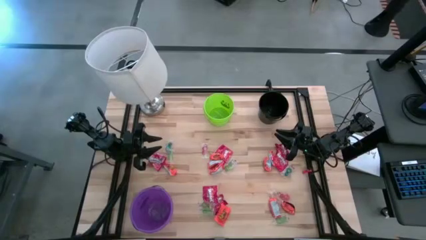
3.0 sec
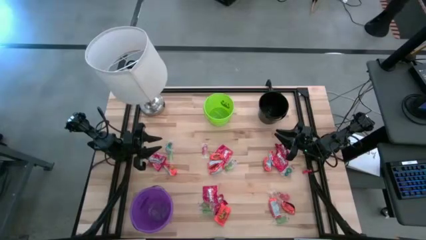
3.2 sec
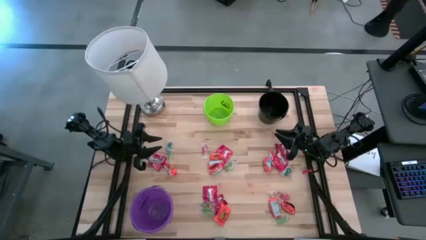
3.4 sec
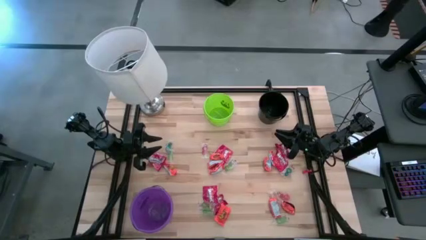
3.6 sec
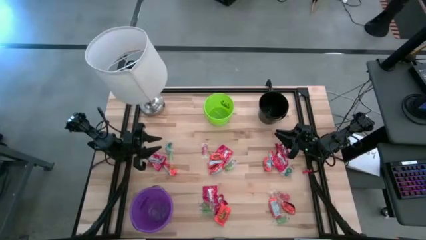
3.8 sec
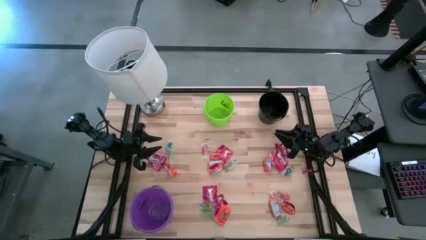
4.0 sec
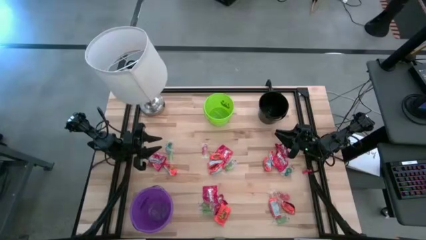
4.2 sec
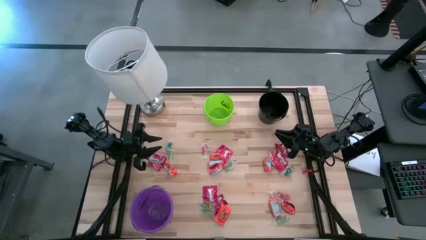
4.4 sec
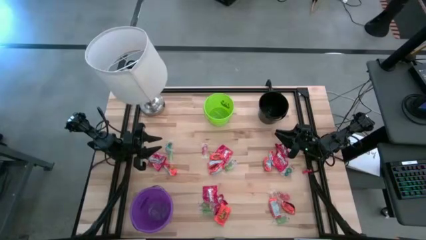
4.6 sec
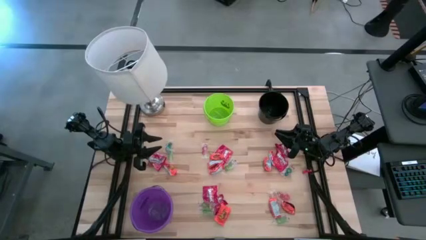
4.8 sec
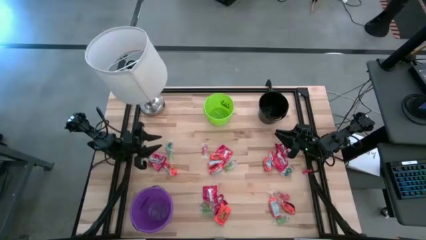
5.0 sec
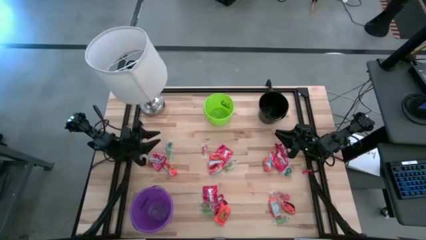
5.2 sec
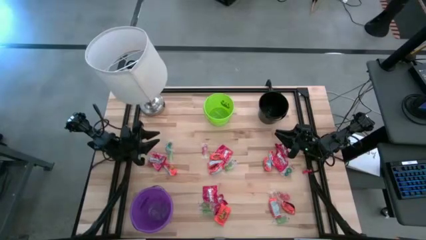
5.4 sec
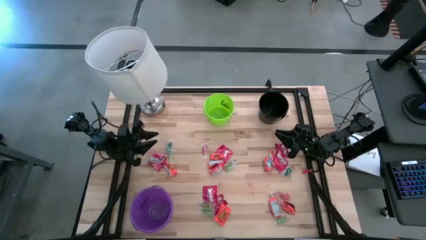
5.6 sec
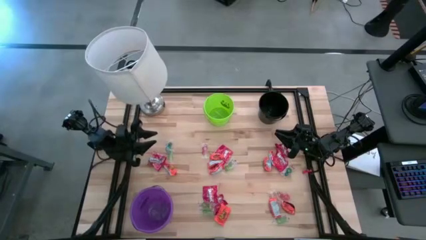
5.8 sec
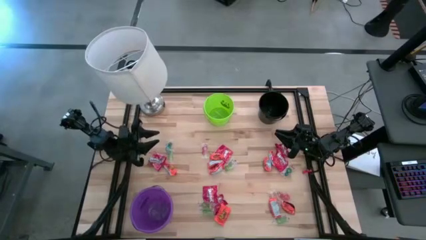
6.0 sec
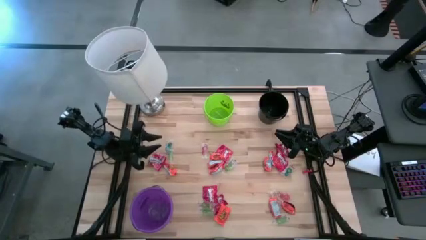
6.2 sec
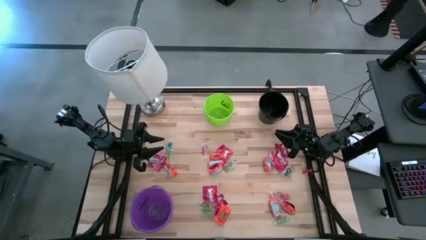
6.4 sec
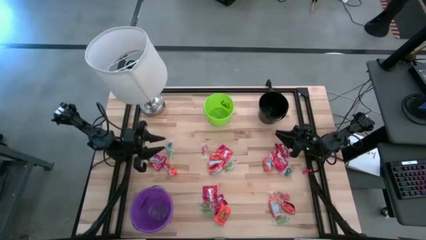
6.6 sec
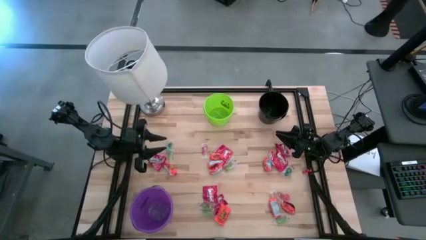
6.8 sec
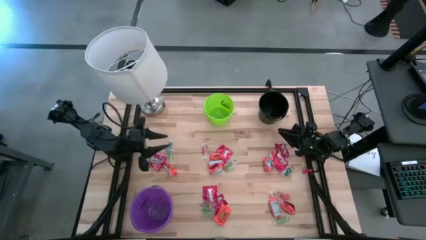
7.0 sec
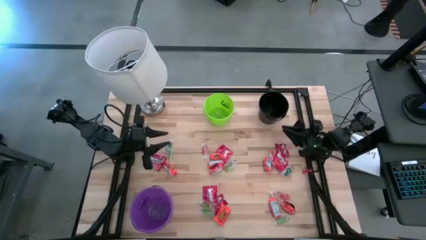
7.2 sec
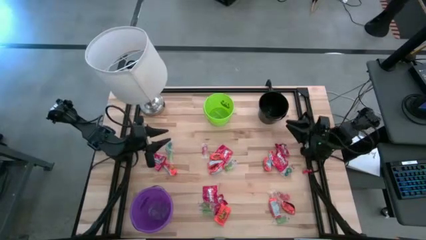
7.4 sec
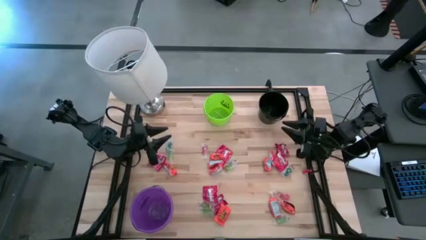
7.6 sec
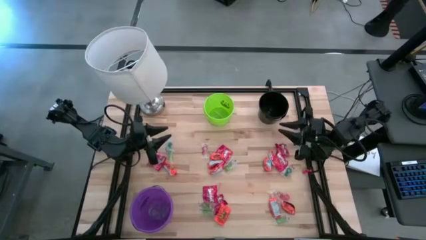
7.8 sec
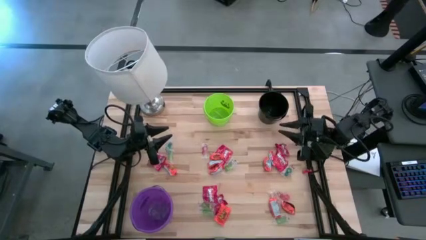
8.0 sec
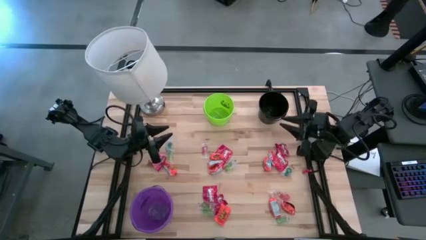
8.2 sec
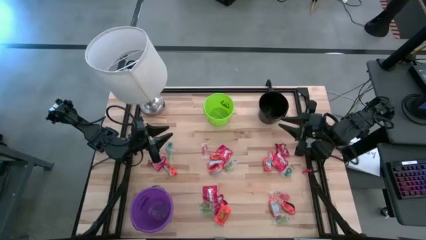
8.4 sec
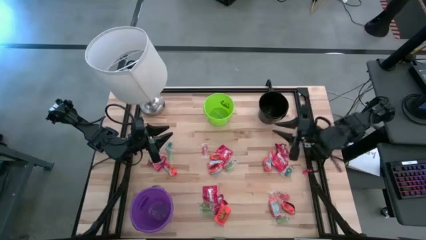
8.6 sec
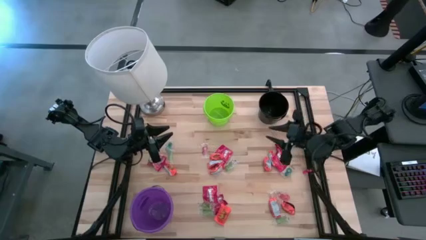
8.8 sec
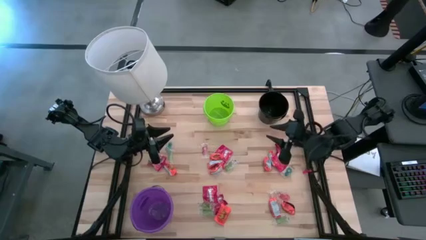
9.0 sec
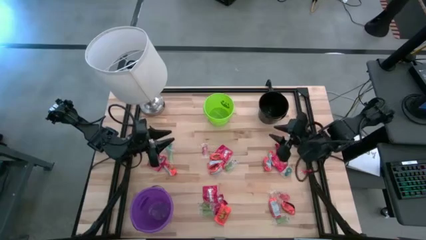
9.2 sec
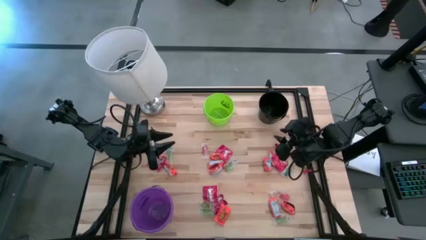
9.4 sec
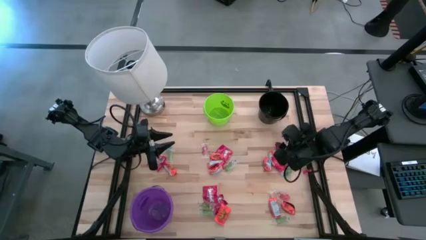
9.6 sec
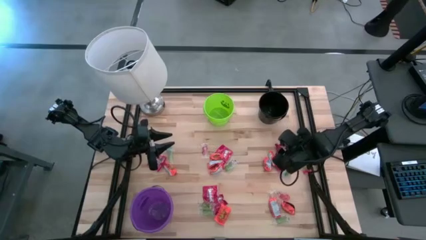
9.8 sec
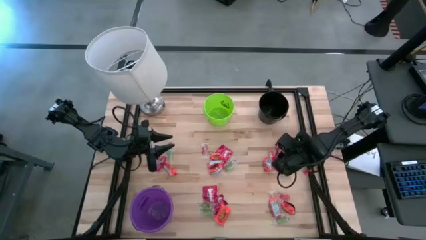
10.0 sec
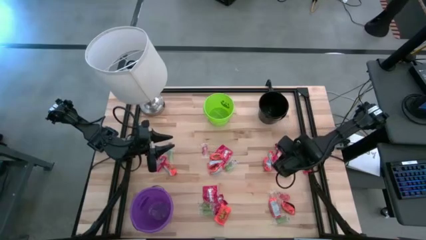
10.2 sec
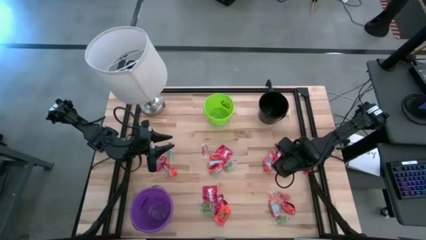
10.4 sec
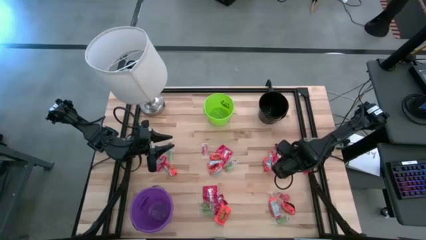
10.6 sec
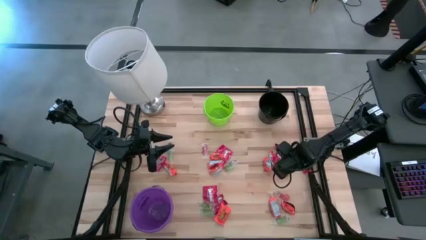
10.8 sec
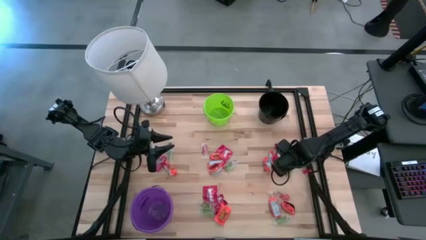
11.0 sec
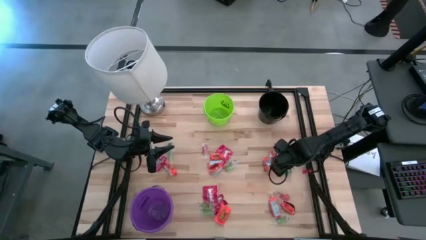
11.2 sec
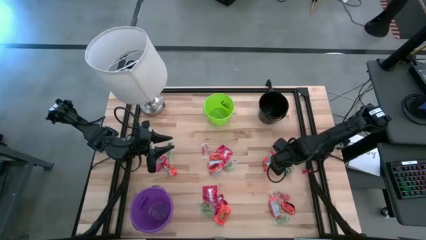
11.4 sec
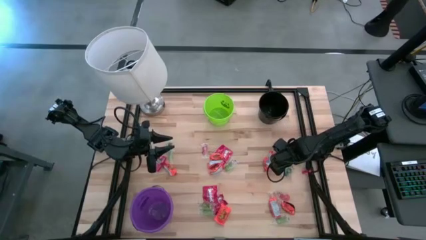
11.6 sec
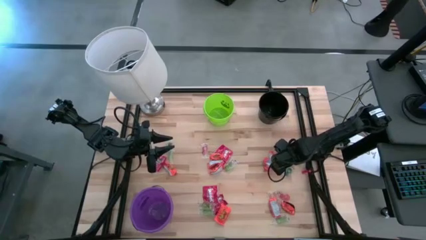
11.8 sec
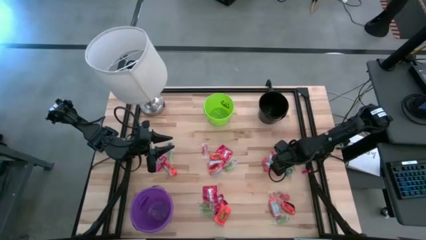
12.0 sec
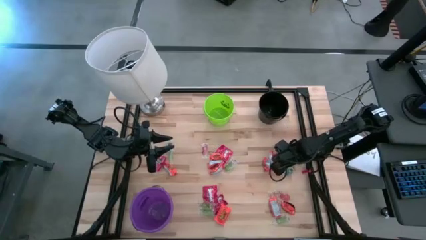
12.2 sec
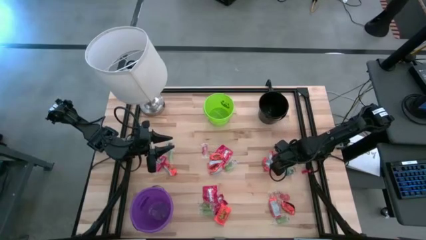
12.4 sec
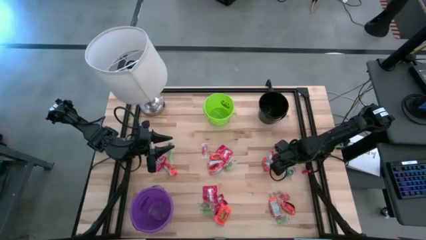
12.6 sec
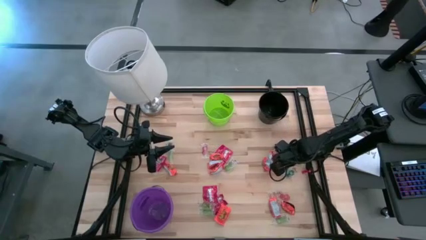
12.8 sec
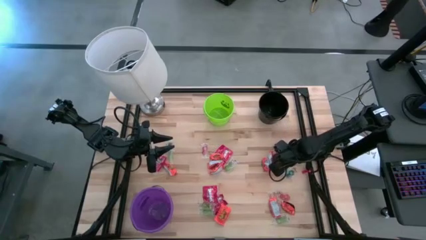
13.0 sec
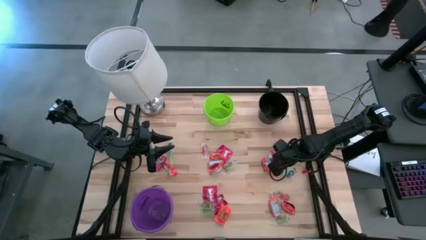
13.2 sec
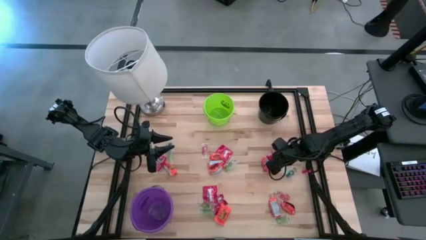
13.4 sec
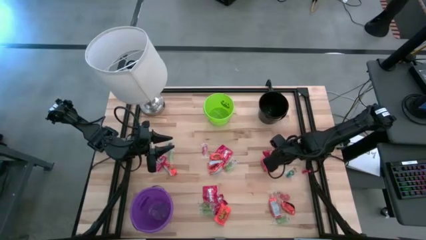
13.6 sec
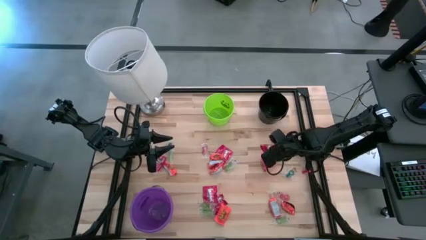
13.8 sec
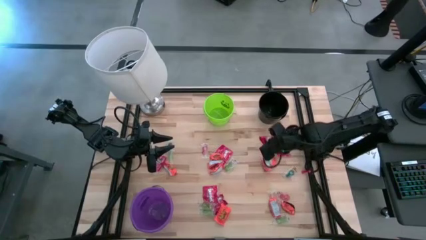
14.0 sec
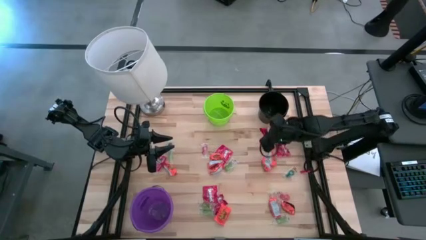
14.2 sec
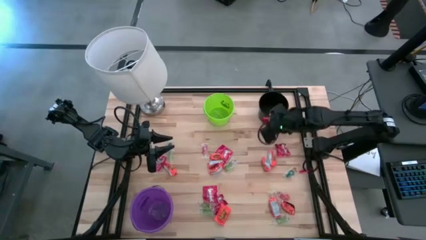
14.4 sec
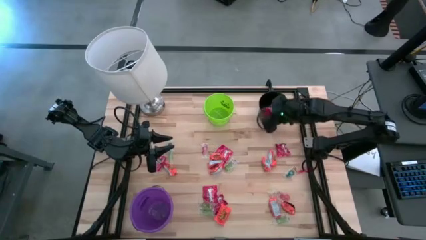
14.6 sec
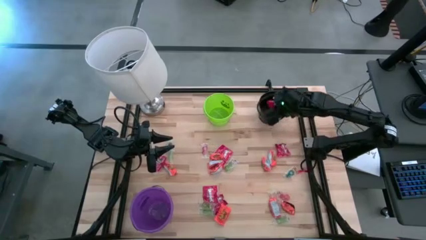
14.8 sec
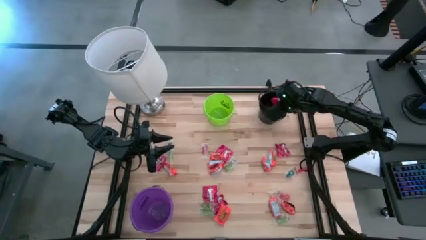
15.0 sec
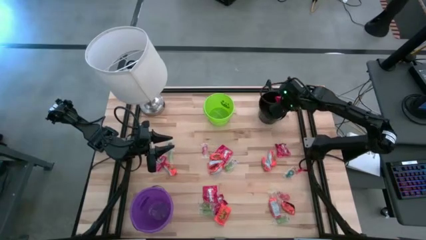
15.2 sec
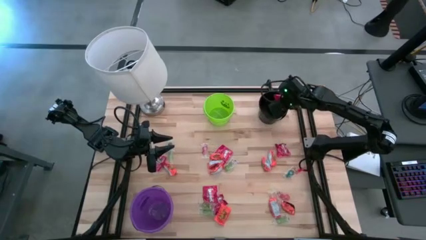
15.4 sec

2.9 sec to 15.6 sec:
Task: Sort candy
Put the red candy into the black bucket

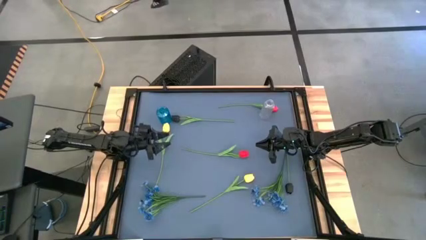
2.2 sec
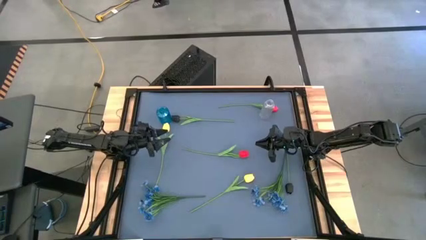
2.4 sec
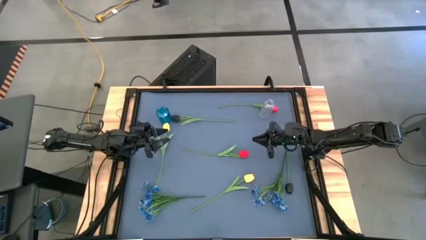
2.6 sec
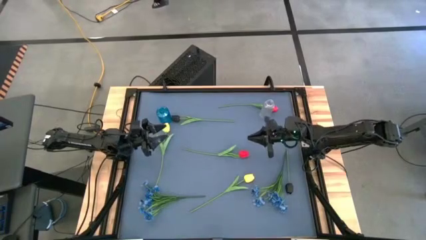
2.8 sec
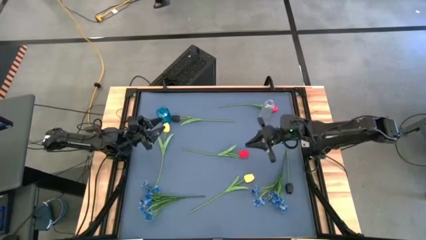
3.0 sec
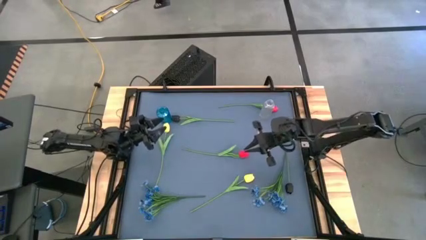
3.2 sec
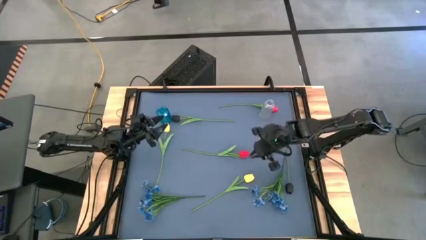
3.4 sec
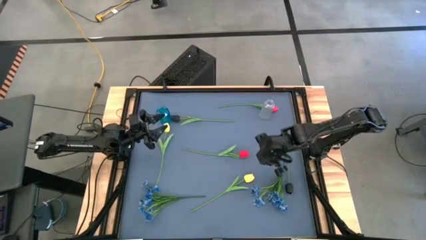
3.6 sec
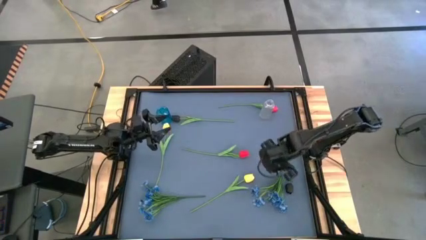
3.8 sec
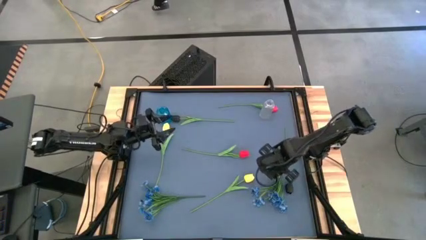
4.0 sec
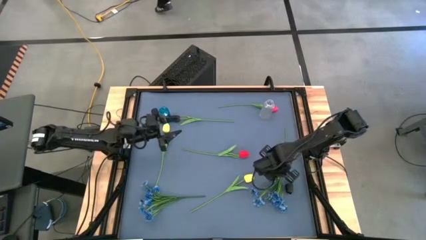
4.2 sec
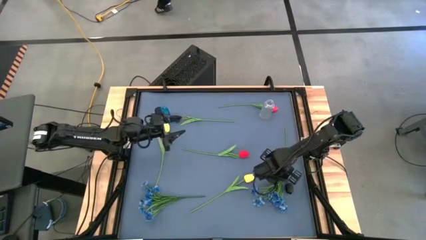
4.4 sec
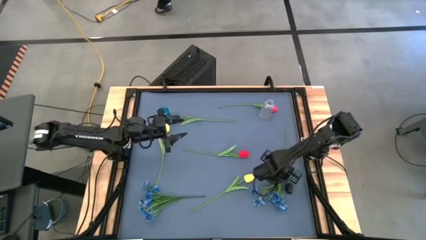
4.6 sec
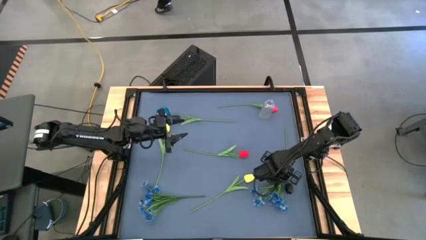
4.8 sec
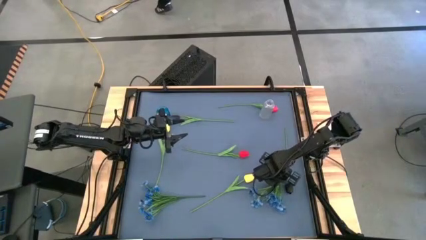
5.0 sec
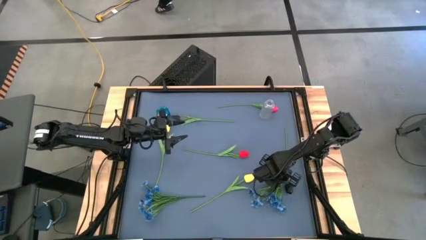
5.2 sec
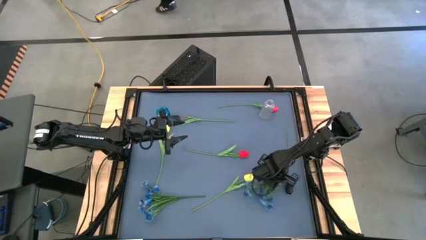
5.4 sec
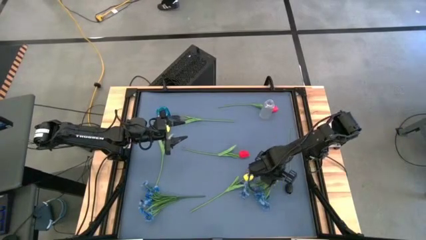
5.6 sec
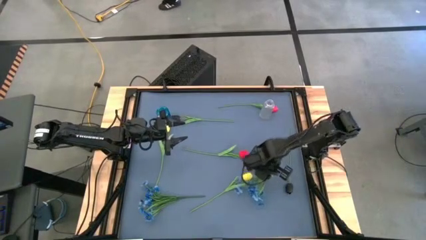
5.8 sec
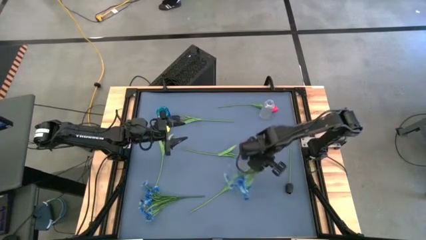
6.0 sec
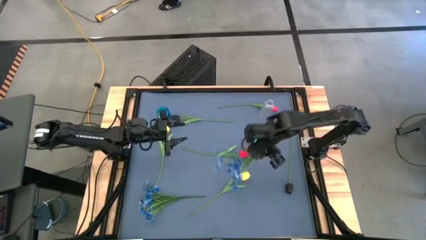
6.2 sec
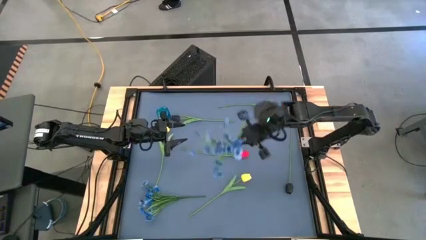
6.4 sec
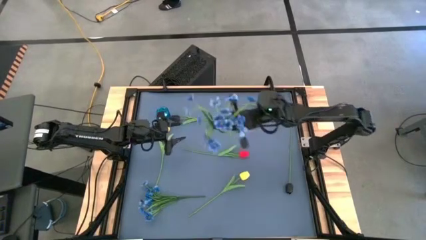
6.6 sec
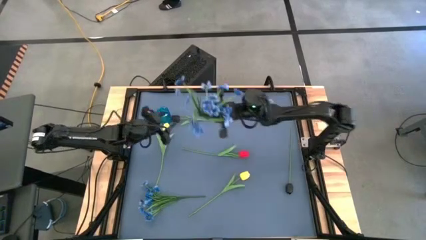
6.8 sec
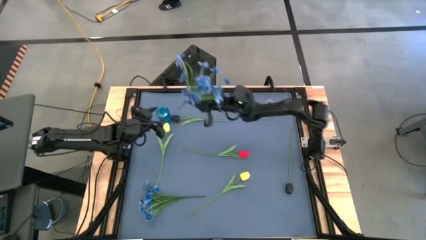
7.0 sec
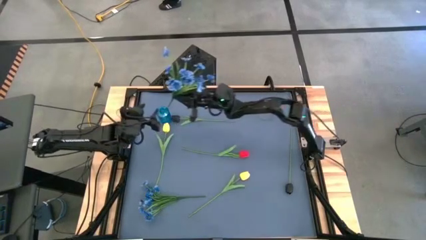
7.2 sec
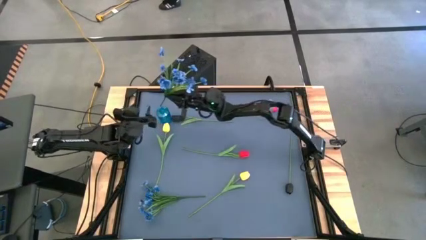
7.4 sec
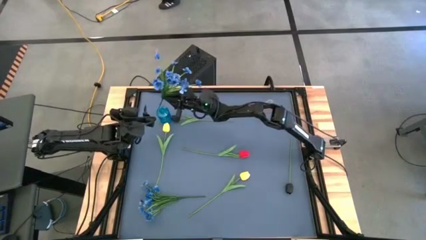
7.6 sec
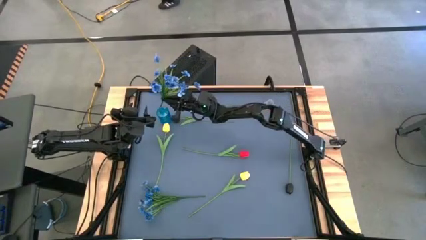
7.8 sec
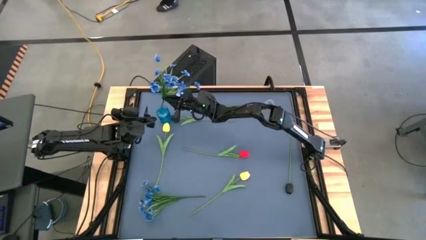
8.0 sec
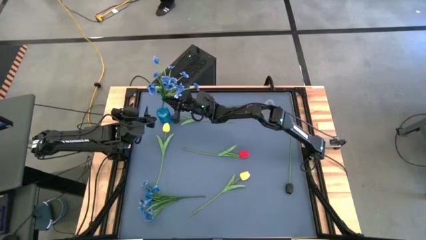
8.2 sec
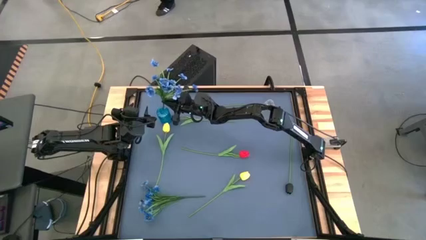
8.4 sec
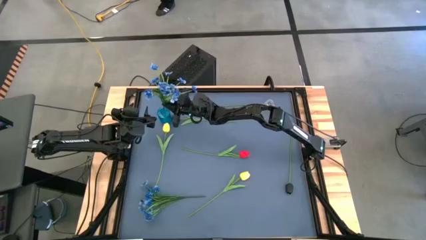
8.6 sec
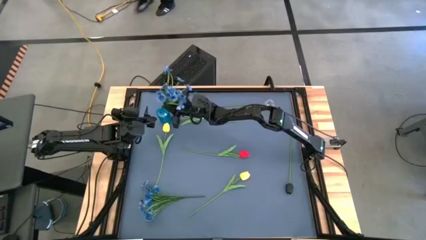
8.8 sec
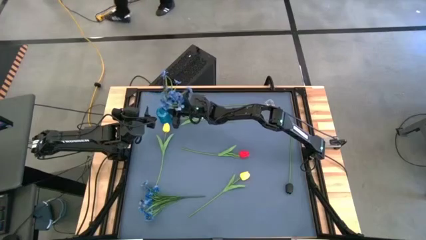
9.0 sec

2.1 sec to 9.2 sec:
Task: Sort flowers into vase by color
Put the right blue flowers into the blue vase
